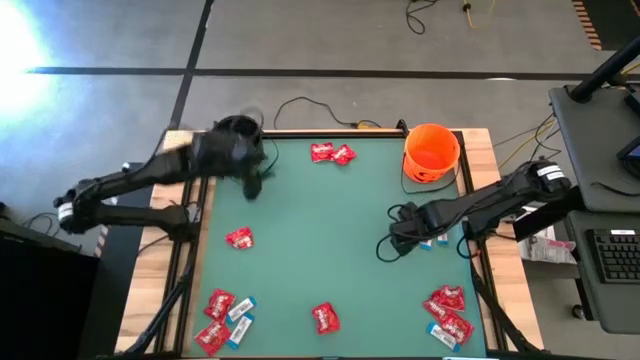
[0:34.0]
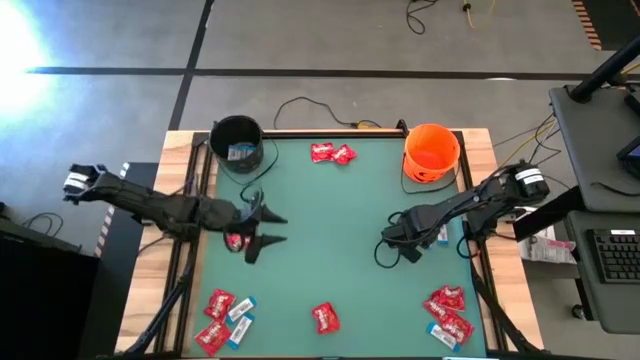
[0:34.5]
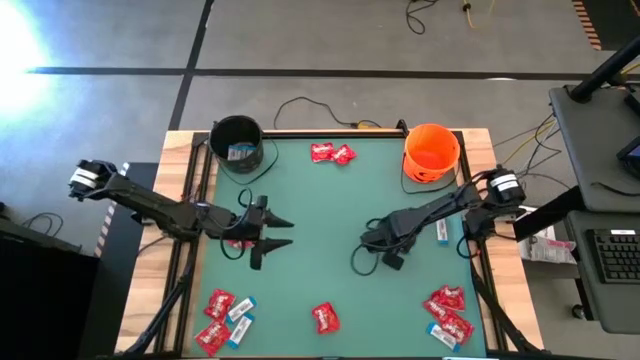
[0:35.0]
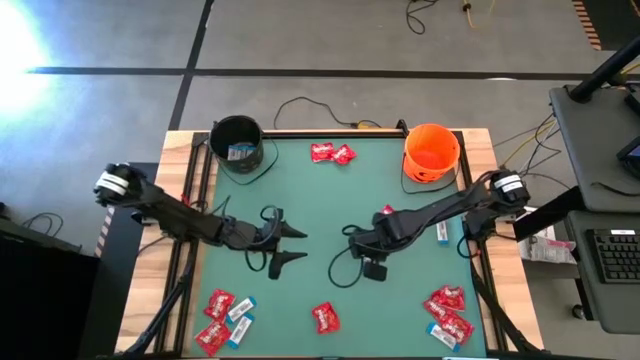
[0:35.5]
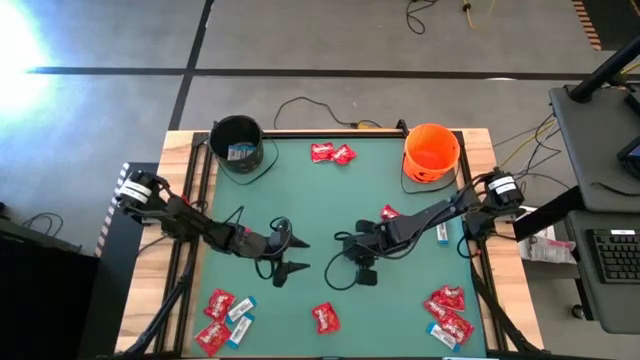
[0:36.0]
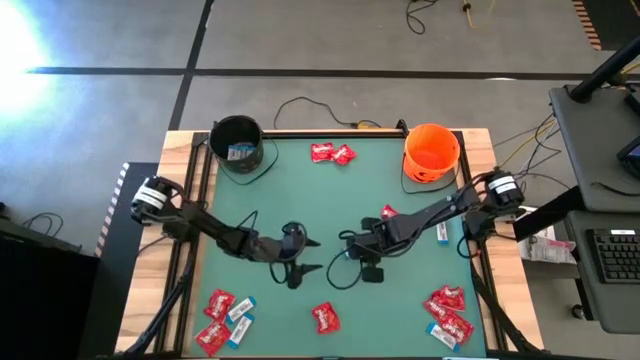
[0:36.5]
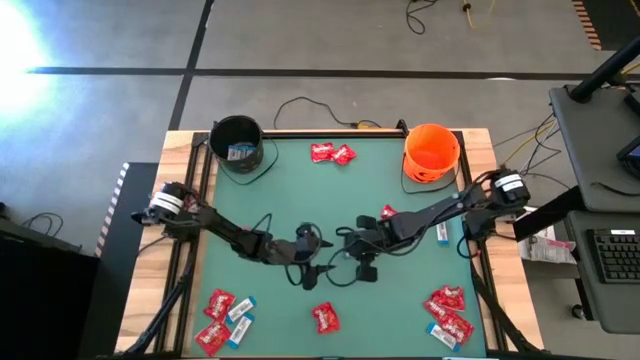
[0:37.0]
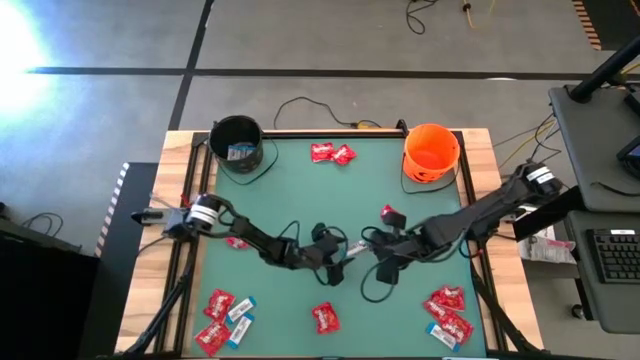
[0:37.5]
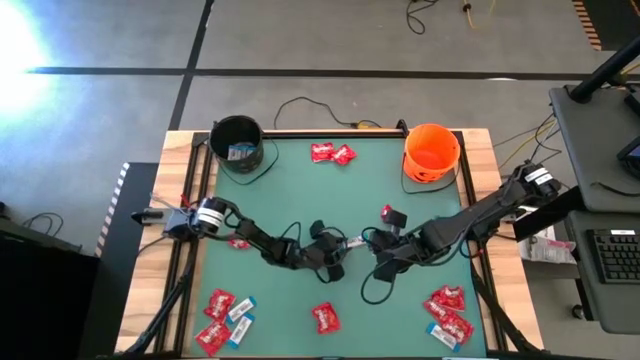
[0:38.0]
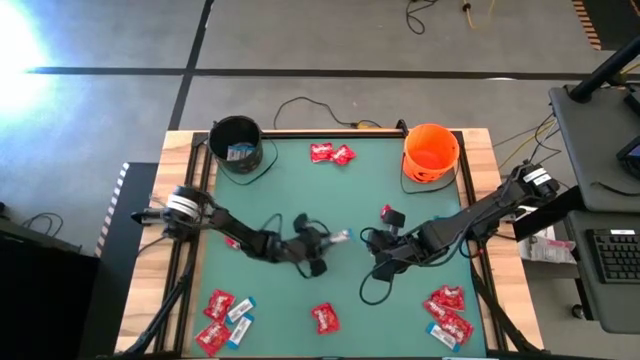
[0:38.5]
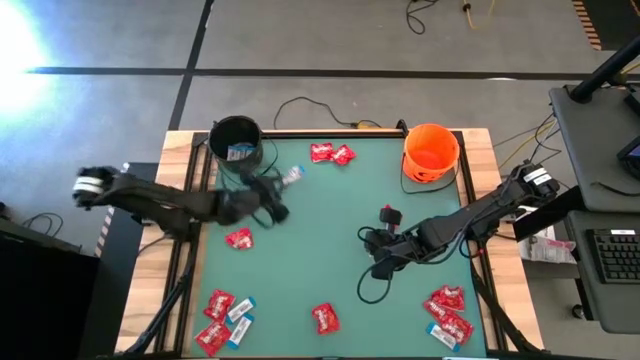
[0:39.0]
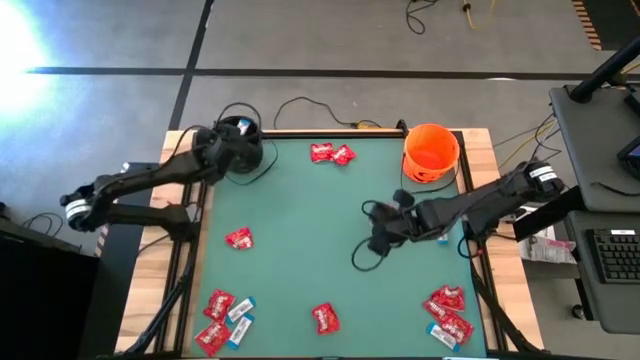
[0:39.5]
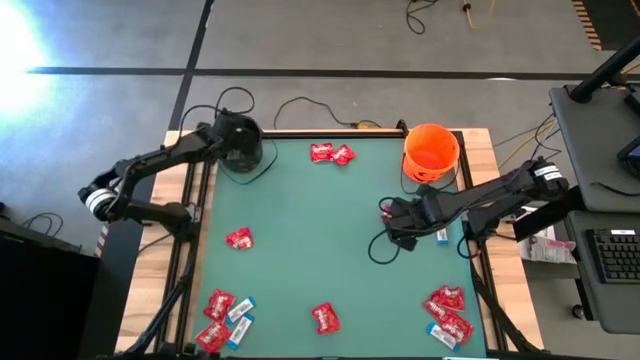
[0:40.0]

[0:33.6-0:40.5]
Task: Sort candy by brand, put in halloween buckets
Put the white chocolate into the black bucket

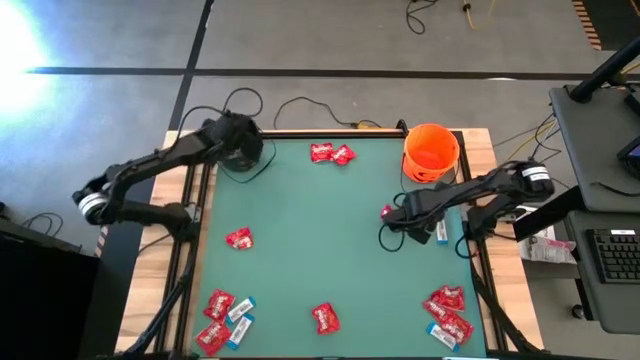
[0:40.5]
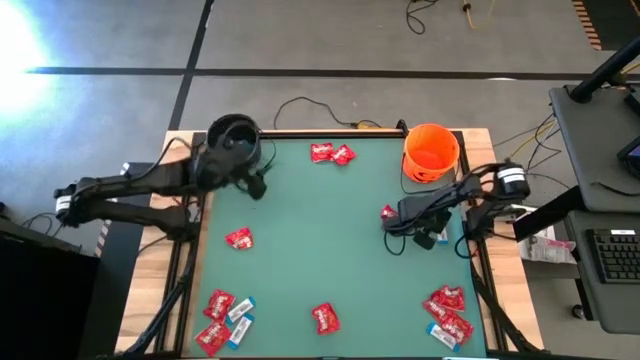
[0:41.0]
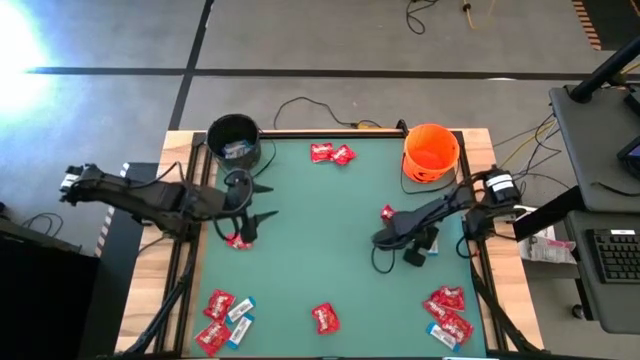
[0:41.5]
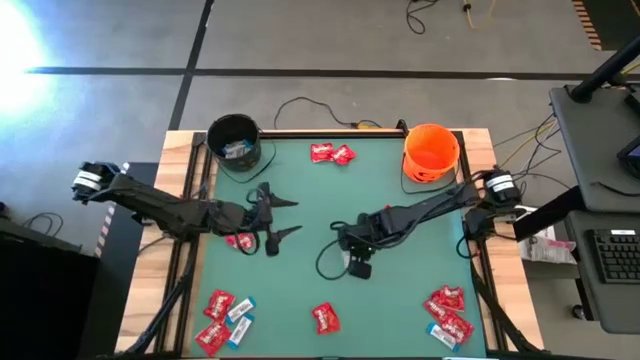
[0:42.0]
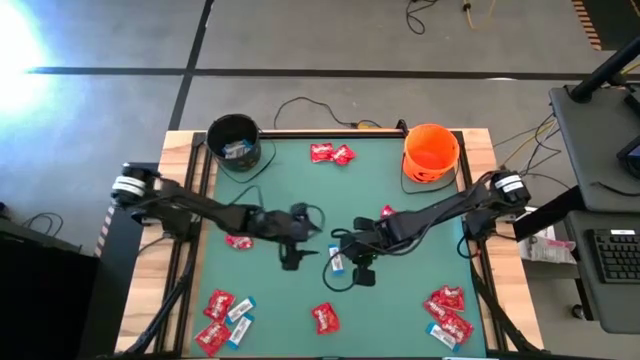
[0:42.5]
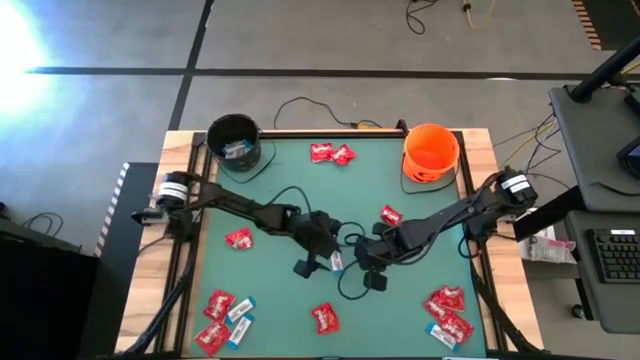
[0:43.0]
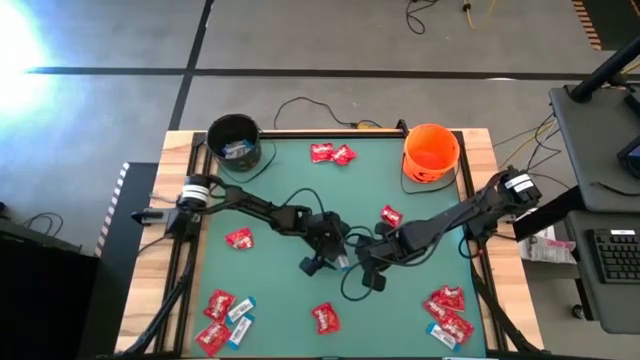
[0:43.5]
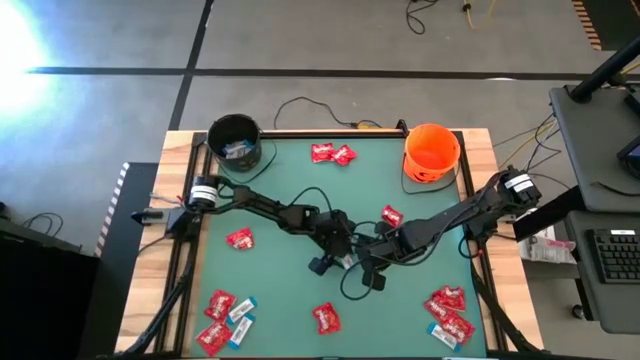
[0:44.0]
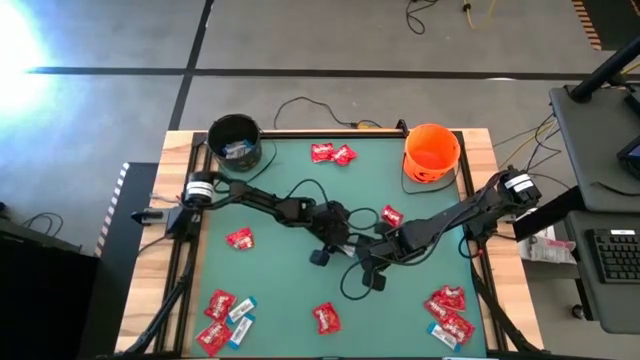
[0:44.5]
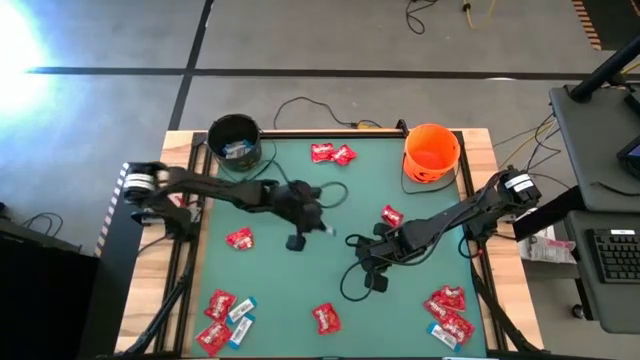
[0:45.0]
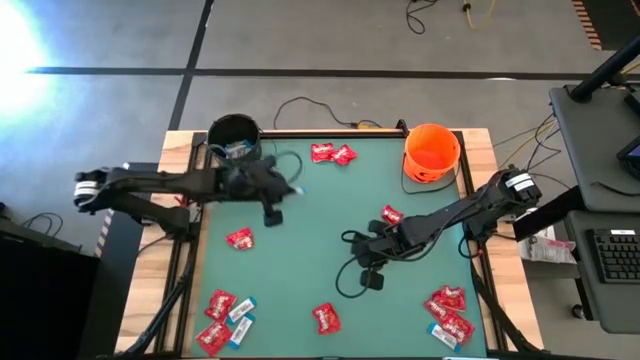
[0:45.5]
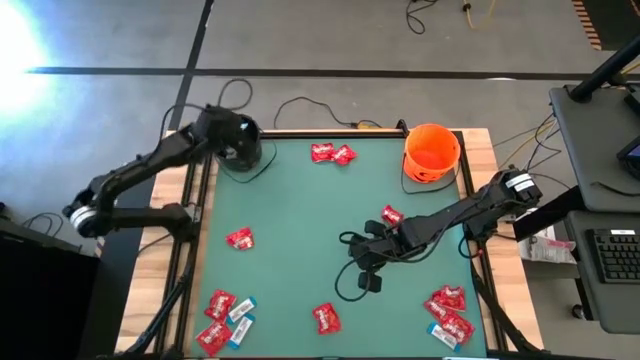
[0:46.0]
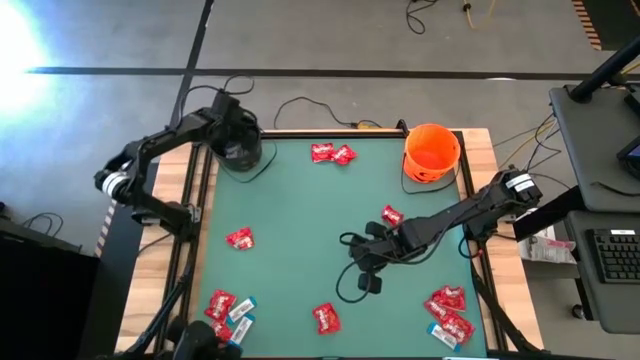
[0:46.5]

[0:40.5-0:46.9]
Put the white chocolate into the black bucket

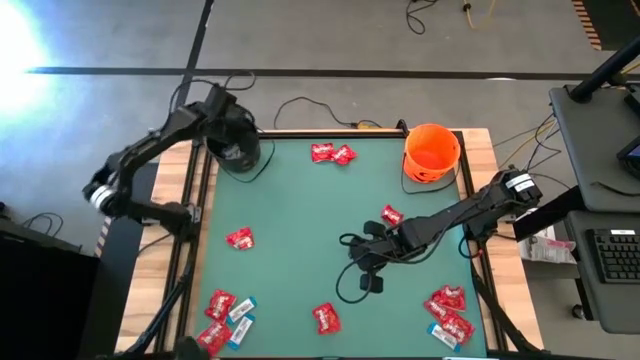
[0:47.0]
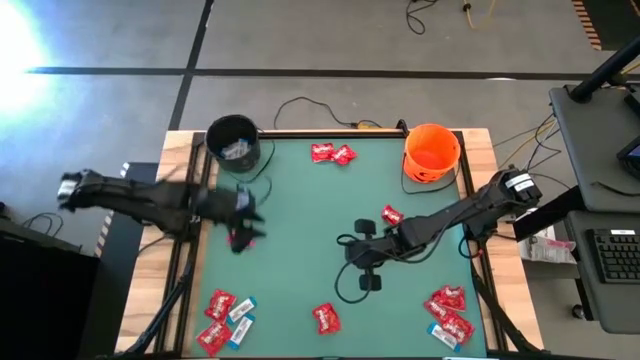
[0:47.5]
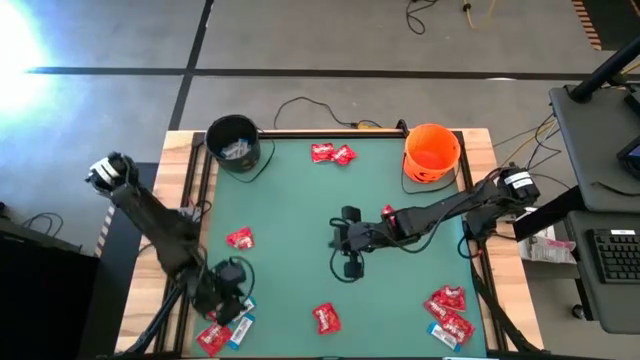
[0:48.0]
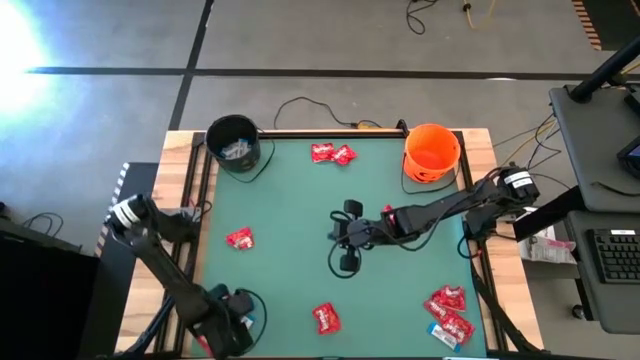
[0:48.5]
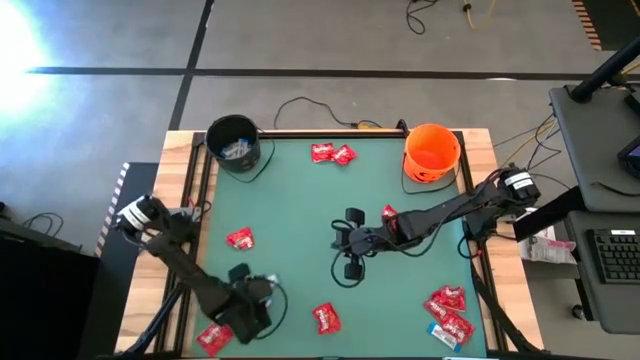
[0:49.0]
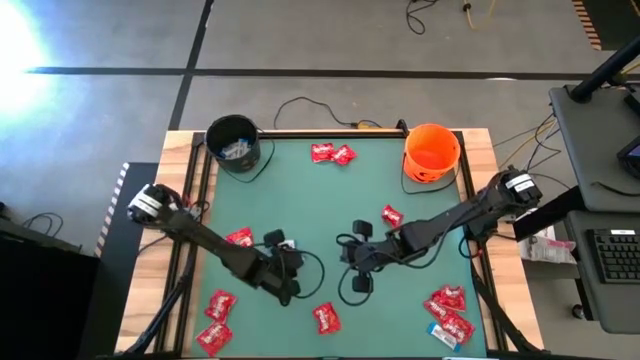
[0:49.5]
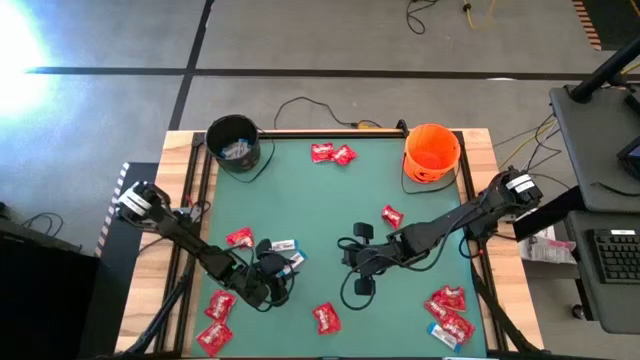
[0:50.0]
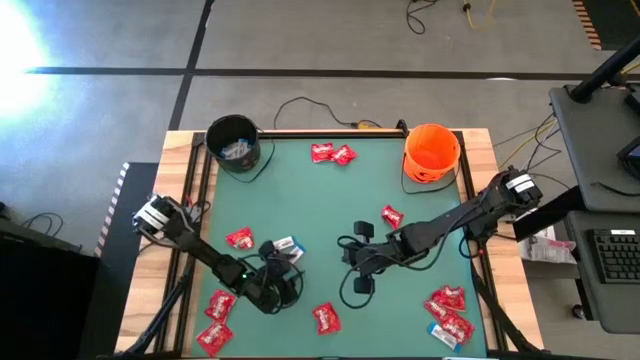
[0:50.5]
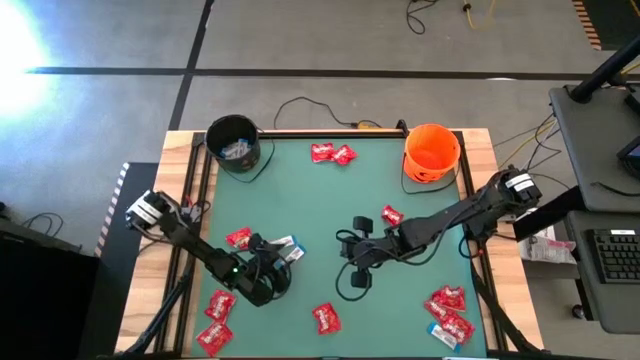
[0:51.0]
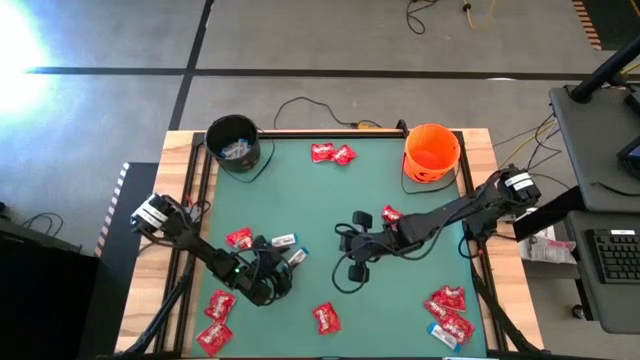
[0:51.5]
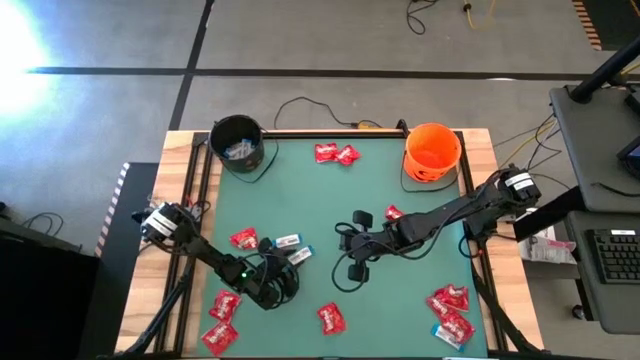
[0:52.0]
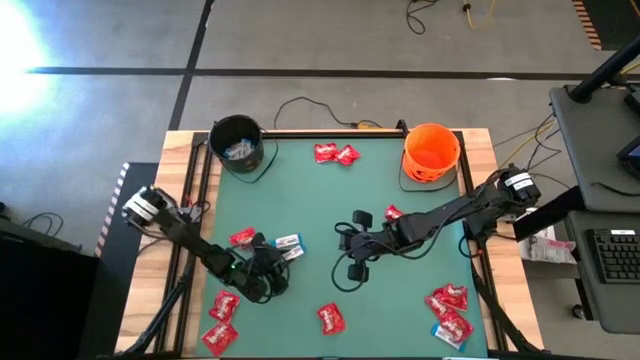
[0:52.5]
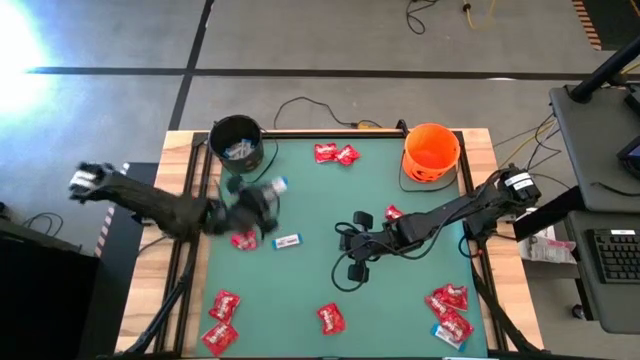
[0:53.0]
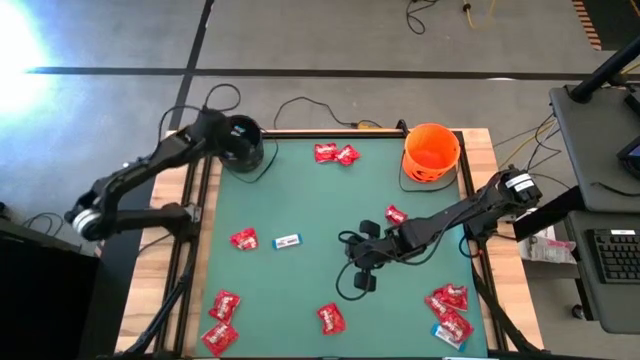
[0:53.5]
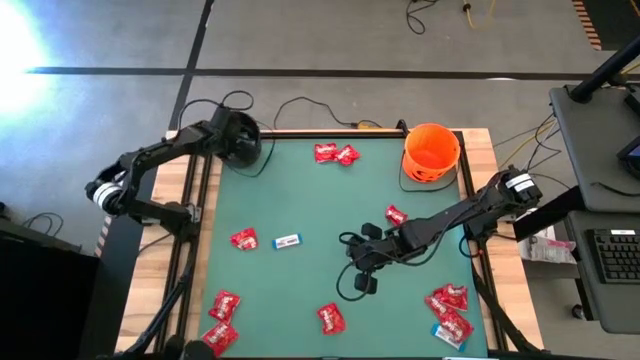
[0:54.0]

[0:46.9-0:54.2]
Put the white chocolate into the black bucket

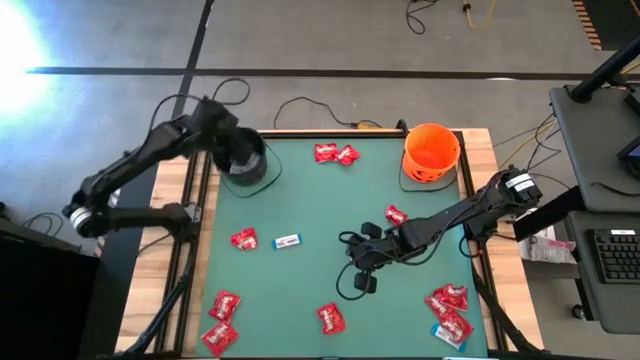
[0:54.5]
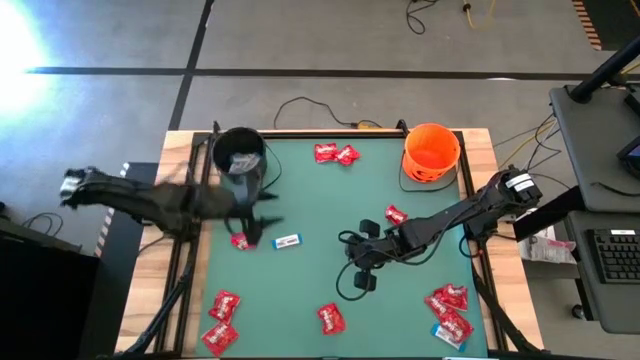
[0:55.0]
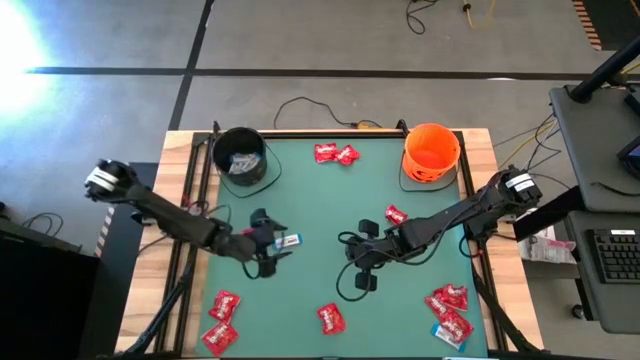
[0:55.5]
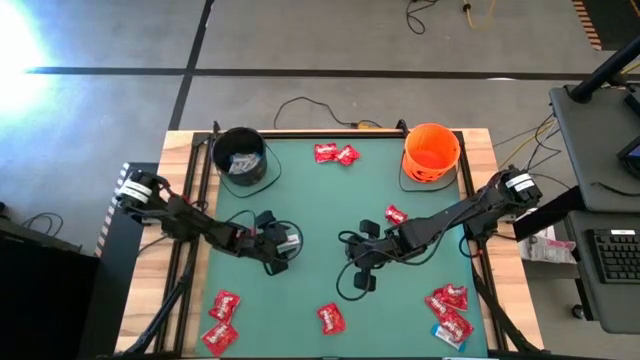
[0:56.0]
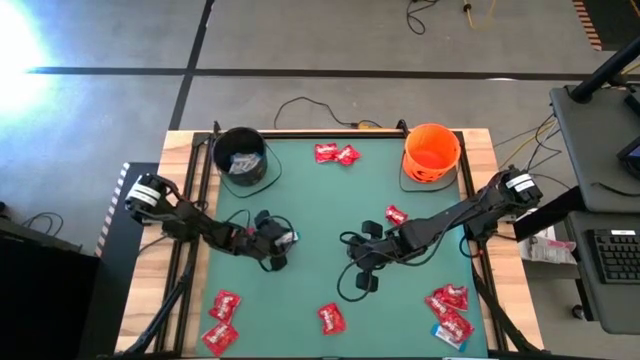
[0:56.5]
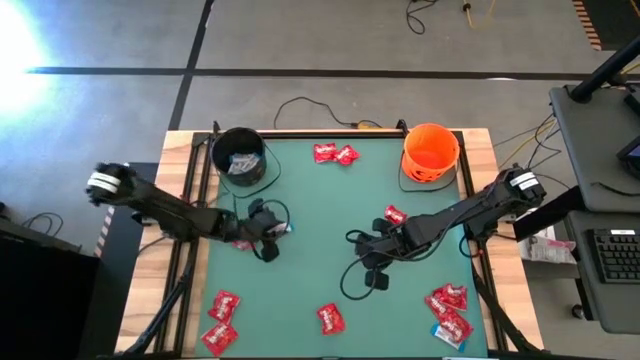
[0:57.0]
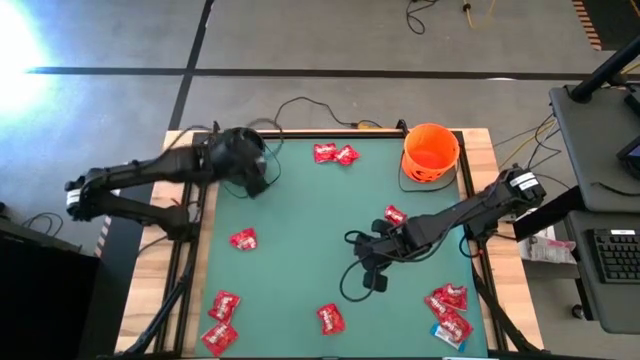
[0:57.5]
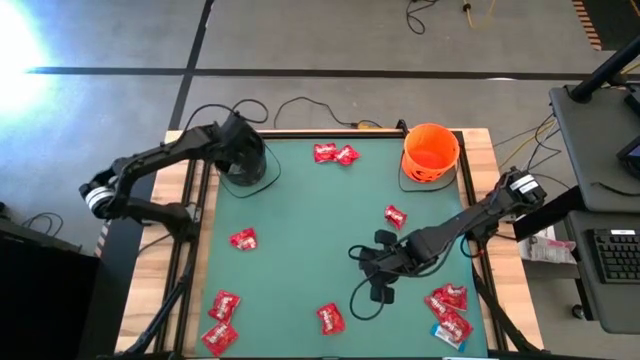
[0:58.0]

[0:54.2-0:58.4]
Put the white chocolate into the black bucket
